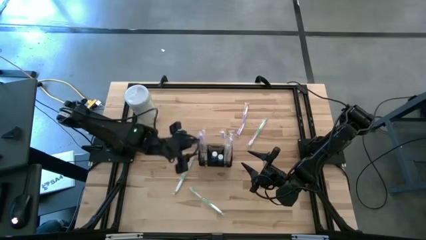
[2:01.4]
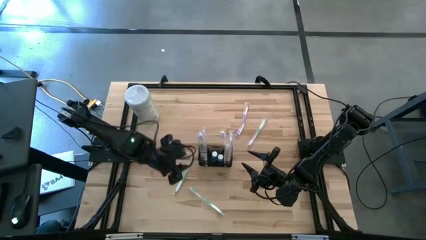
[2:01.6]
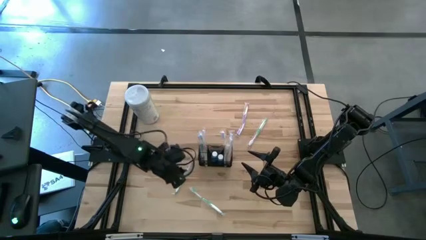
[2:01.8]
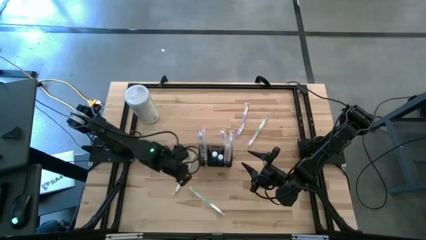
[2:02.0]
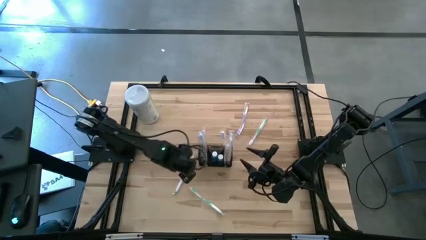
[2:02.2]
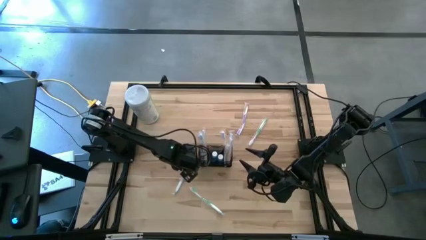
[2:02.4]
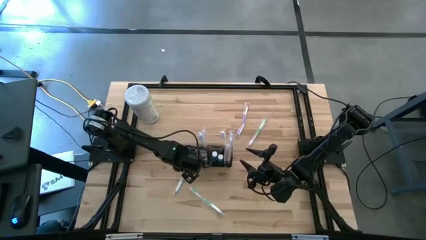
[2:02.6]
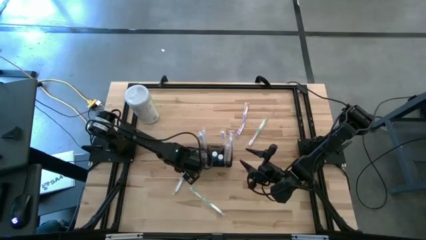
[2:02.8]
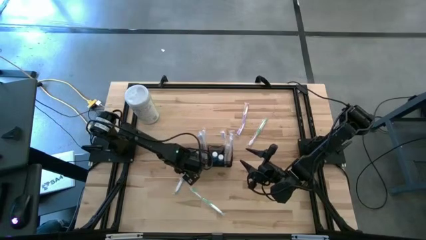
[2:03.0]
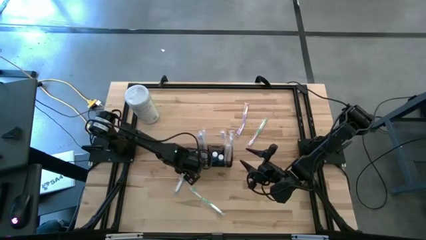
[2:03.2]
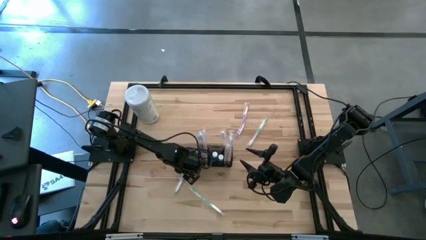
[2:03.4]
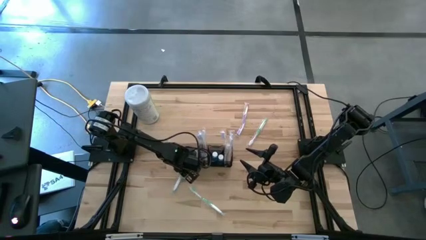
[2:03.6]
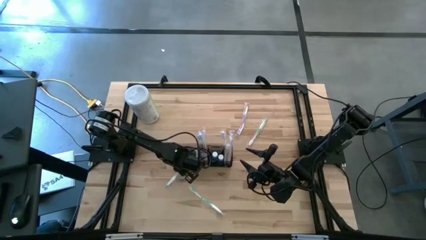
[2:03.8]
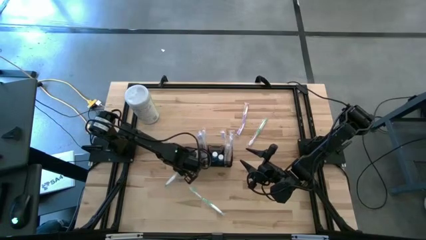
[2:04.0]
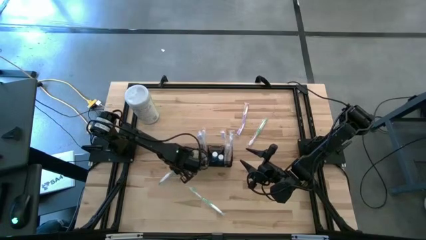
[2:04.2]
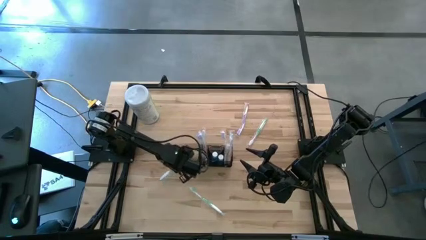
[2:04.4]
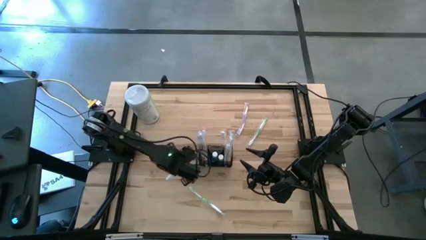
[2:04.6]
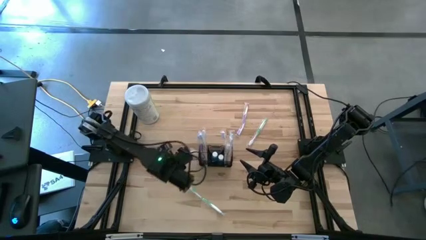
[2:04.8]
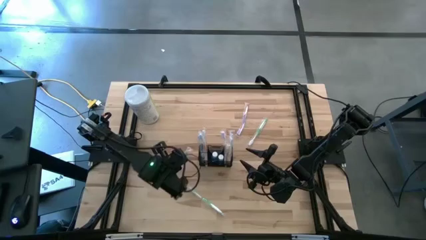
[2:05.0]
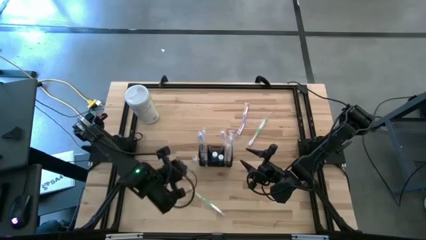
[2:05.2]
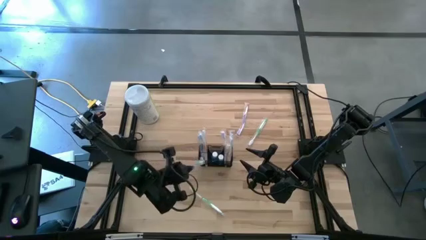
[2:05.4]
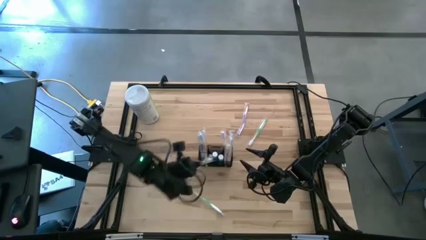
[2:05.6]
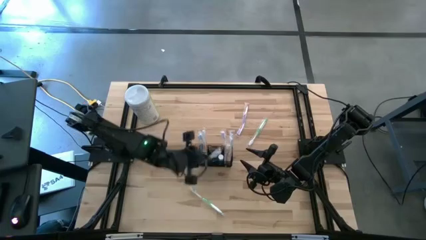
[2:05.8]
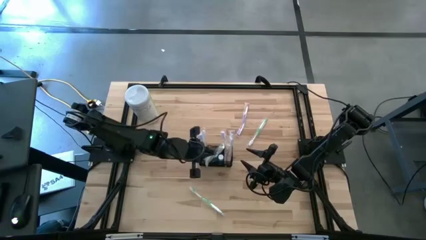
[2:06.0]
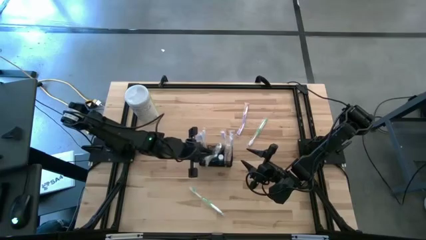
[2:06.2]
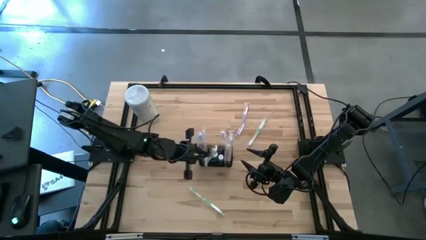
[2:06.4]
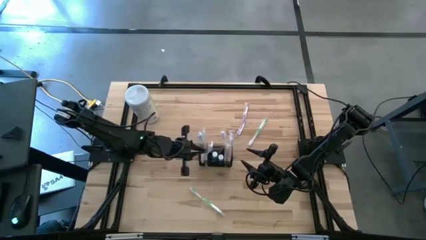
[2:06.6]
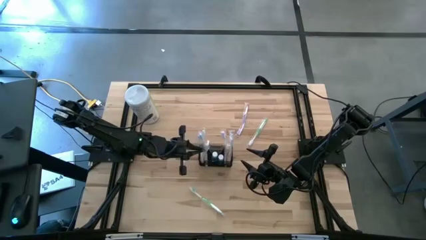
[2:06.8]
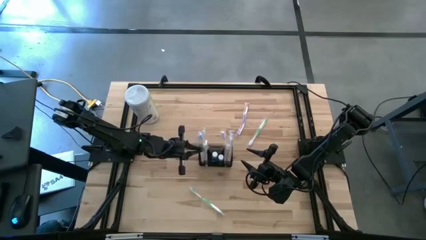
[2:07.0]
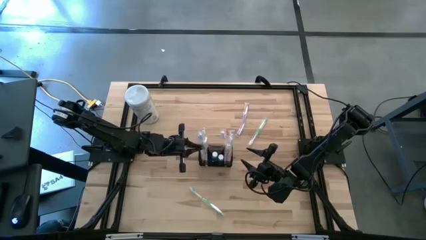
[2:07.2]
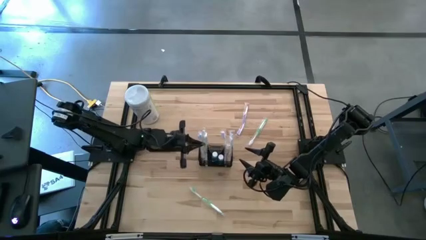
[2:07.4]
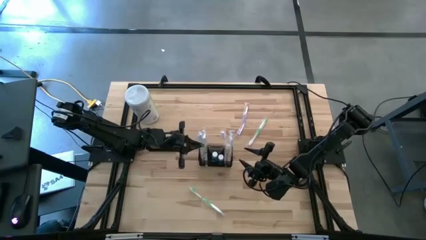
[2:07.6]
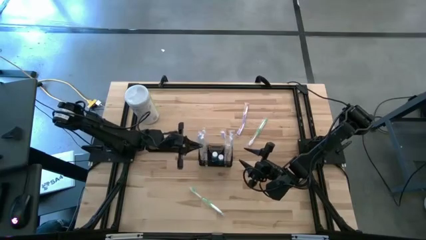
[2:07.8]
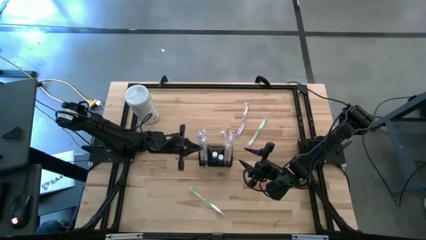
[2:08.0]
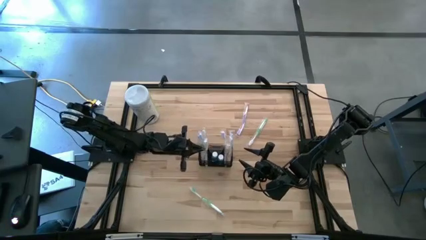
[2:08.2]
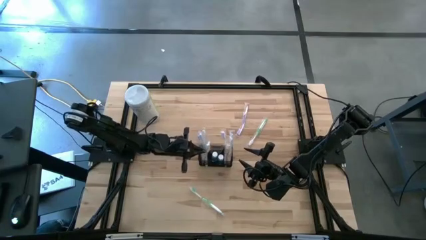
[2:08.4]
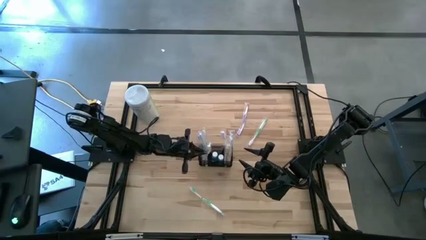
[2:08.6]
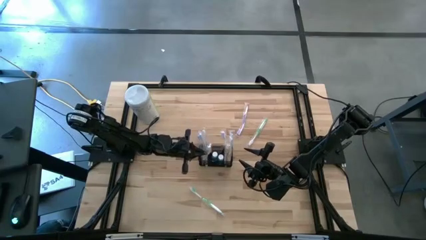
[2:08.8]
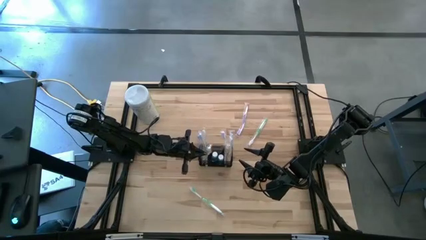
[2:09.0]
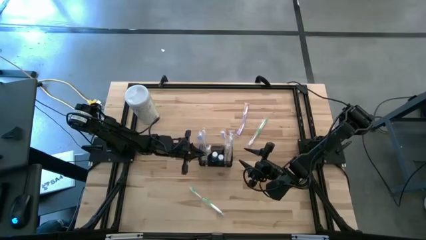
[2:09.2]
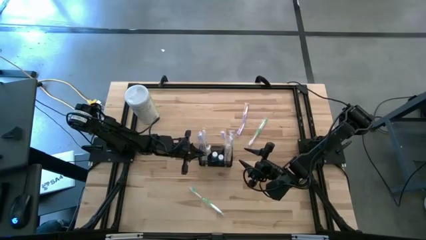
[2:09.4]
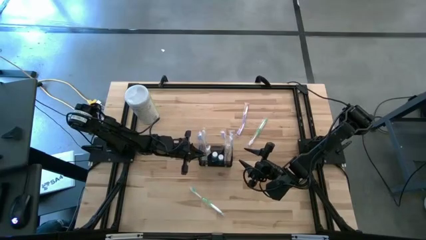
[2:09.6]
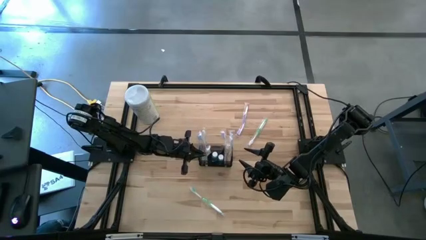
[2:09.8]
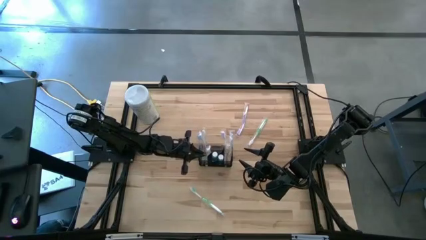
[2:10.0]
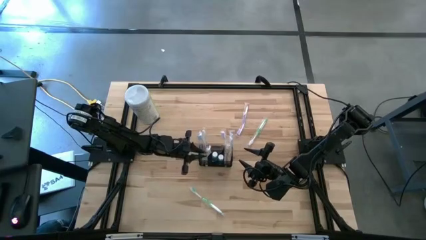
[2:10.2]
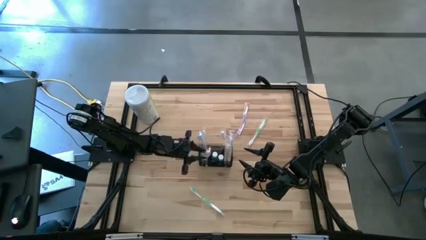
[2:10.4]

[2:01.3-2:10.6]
Task: Pick & Place toothbrushing station
Put the middle left green toothbrush into the black mesh

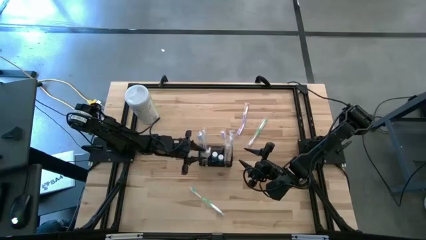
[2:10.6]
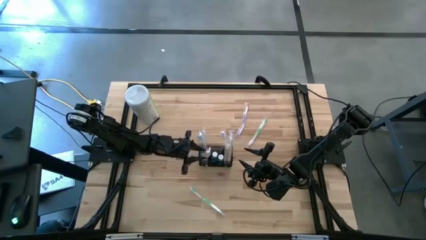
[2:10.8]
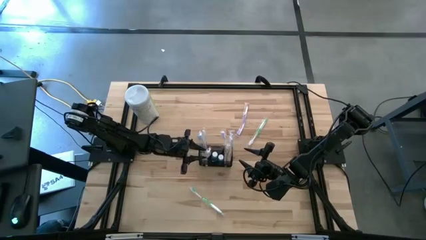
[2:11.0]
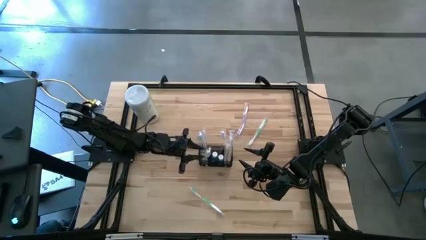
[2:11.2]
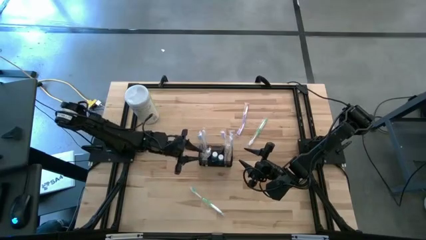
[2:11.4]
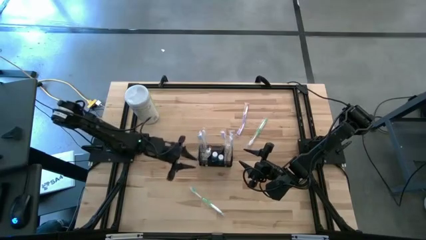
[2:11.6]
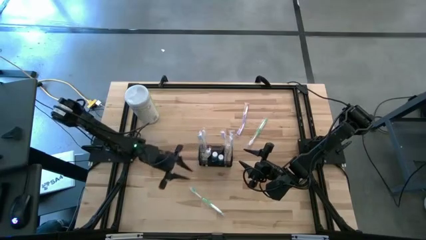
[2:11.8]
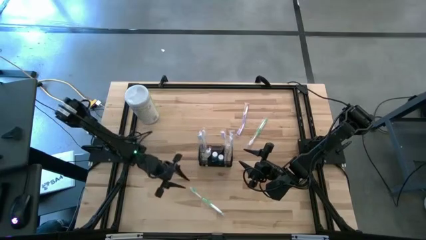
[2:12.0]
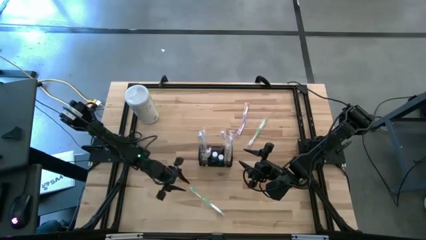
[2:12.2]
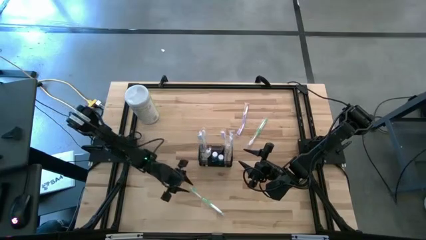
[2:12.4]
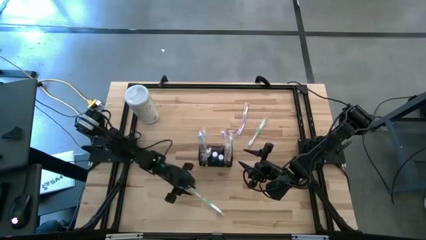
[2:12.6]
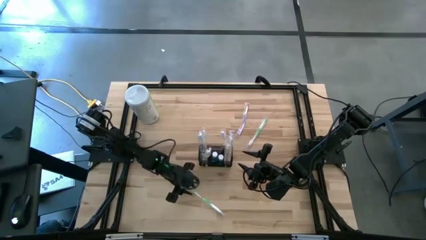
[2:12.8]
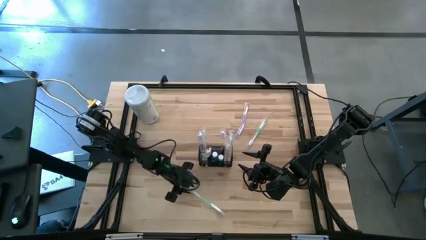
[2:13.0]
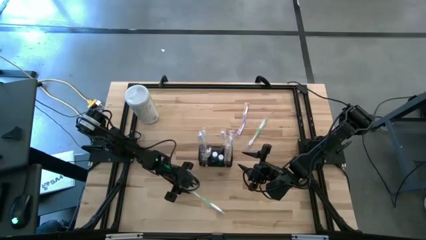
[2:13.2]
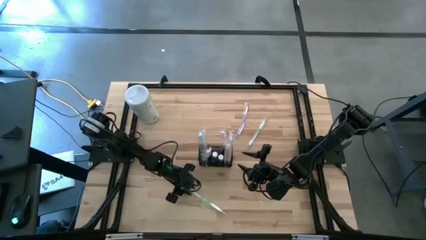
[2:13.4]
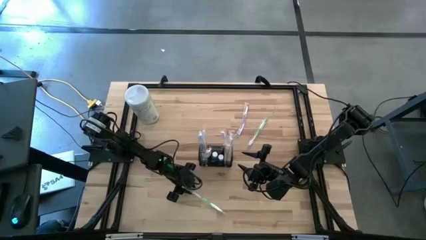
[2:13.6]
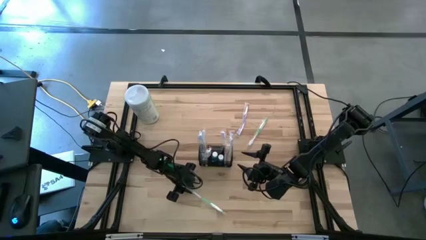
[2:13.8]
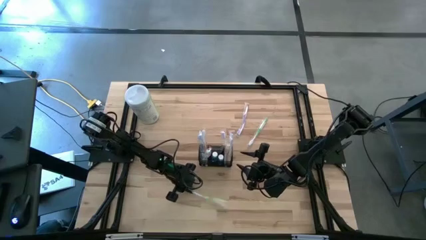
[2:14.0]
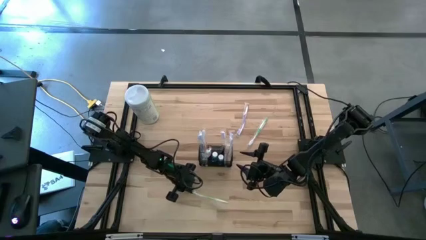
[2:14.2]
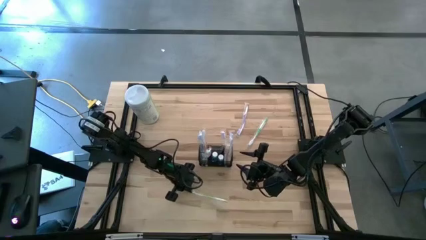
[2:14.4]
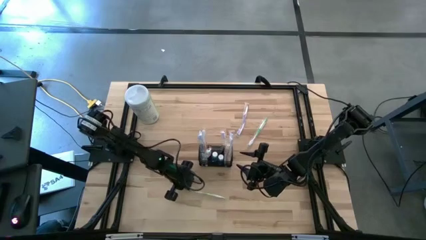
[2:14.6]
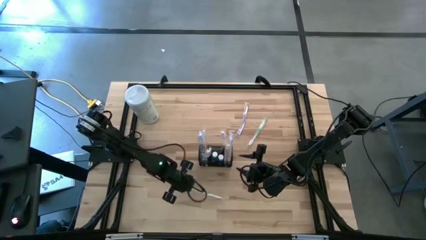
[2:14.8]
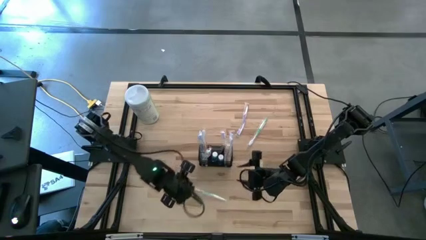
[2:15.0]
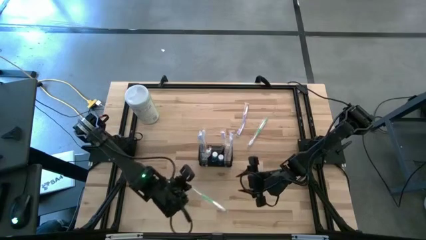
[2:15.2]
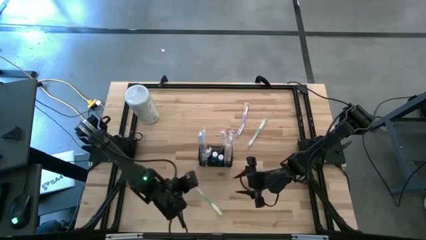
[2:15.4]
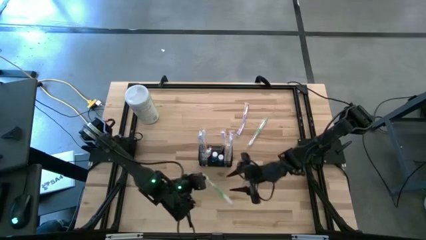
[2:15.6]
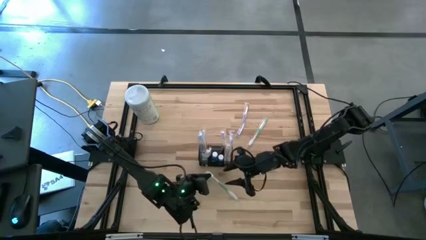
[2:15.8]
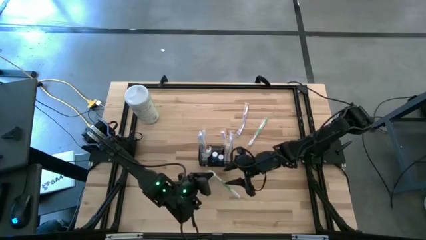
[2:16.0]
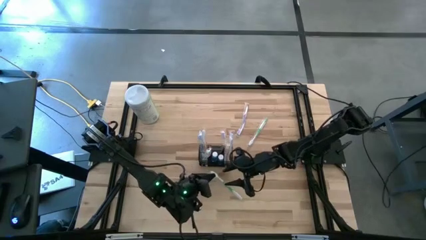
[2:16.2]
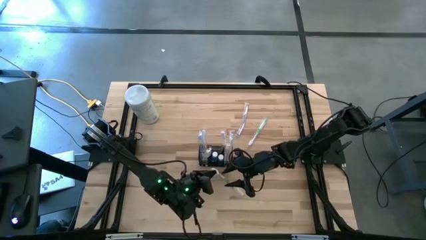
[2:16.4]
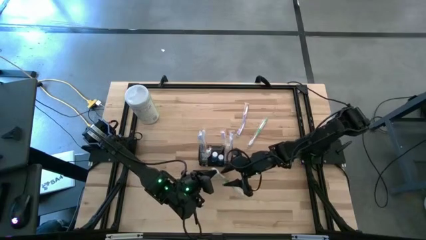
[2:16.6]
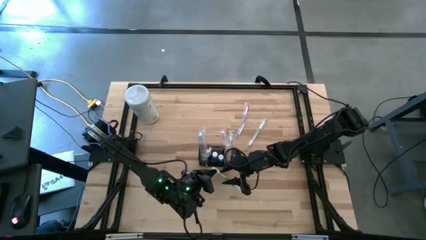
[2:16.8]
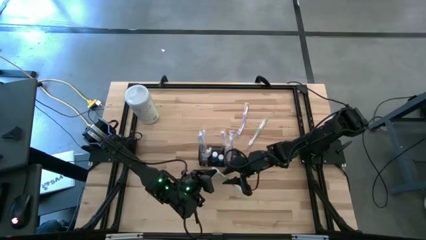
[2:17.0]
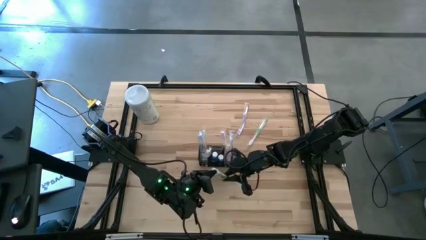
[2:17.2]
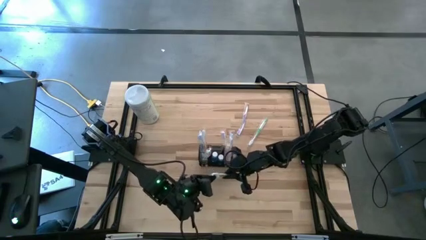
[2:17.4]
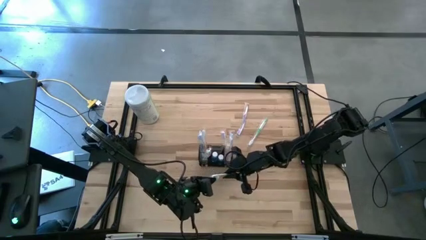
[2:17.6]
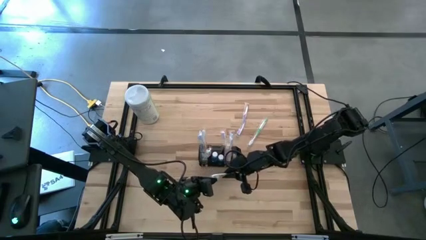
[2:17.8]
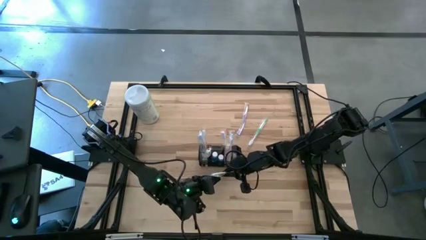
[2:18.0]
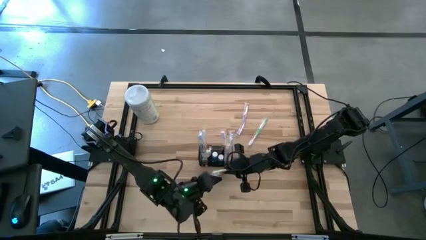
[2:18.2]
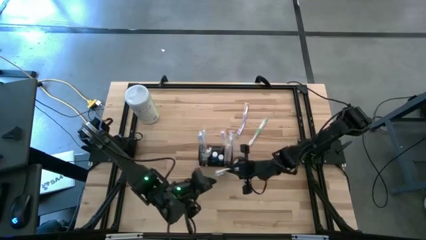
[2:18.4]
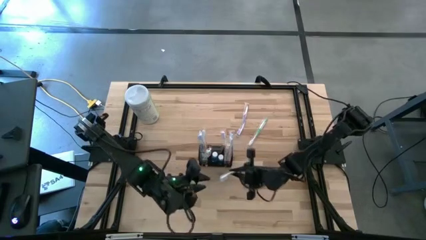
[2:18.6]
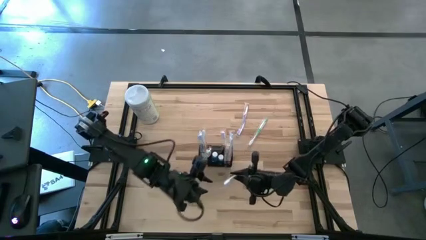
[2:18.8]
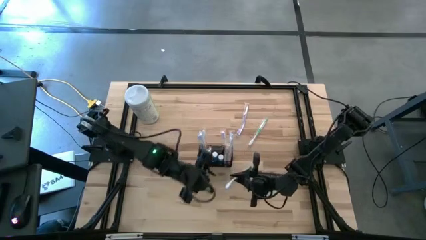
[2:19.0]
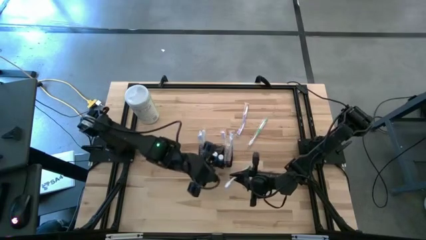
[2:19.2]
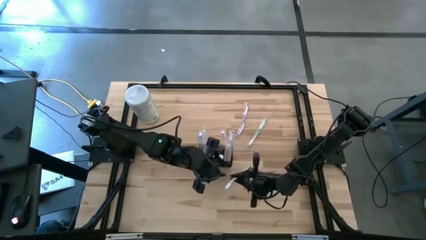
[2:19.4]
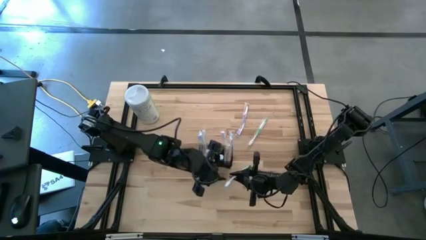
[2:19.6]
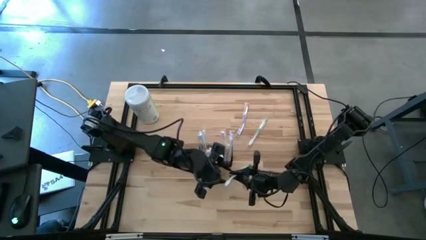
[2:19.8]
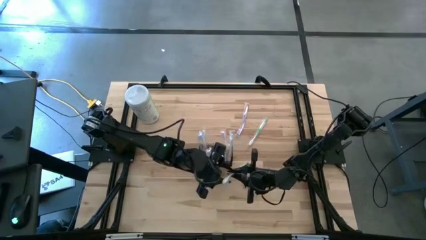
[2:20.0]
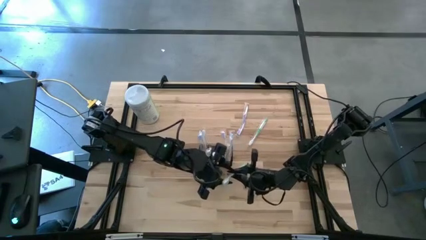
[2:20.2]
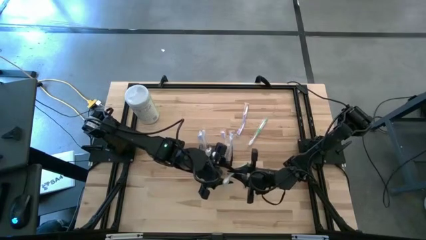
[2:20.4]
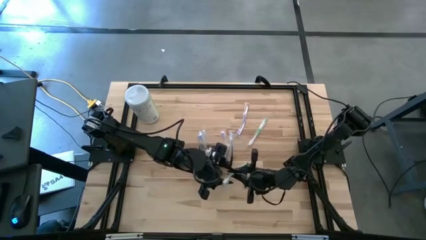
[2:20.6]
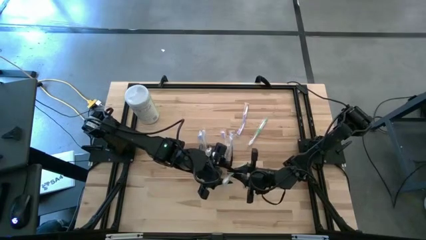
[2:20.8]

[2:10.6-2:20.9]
Put the bottom green toothbrush into the black mesh
